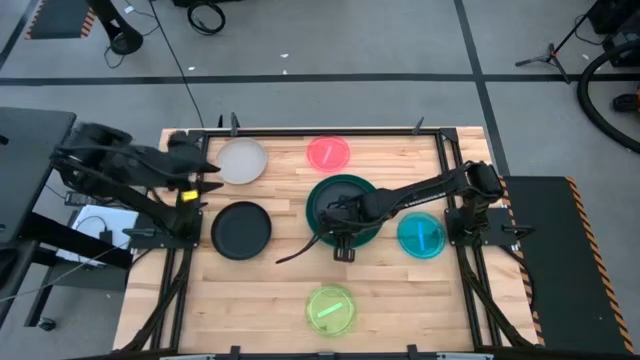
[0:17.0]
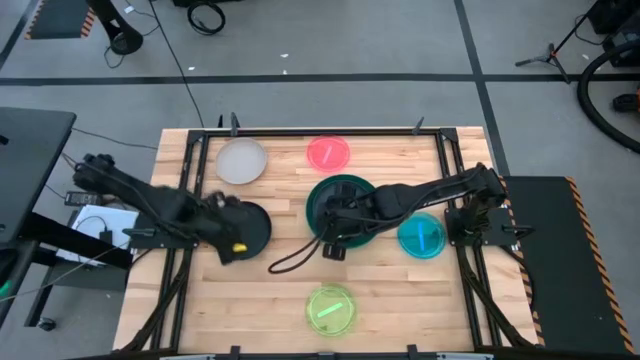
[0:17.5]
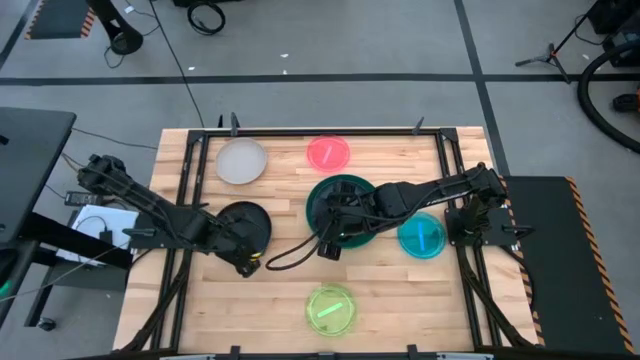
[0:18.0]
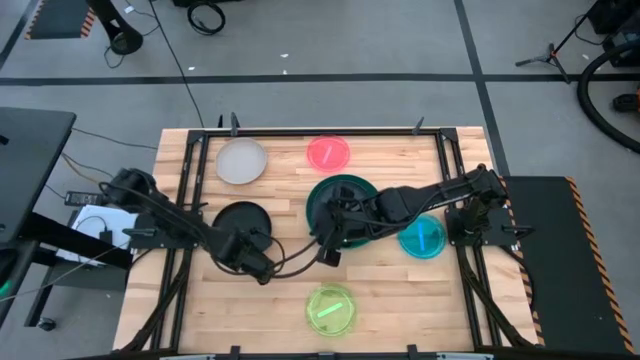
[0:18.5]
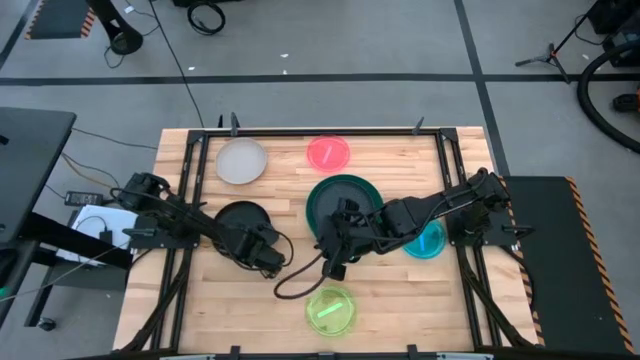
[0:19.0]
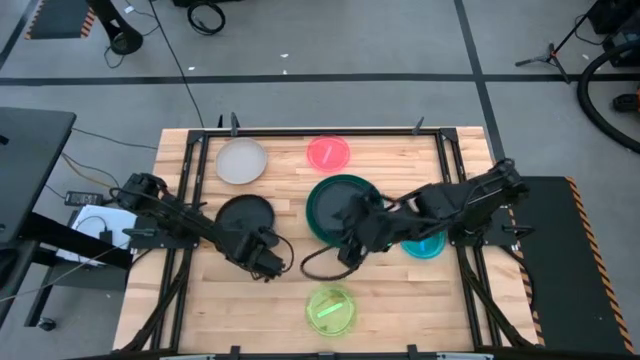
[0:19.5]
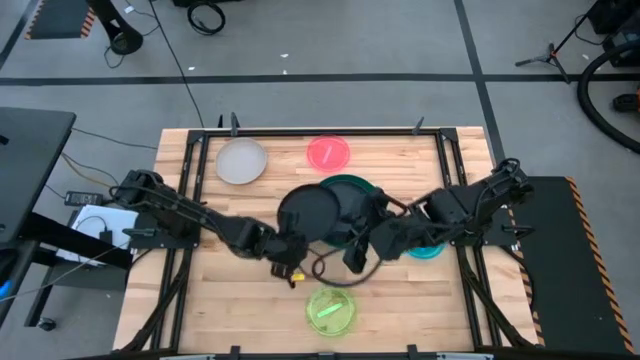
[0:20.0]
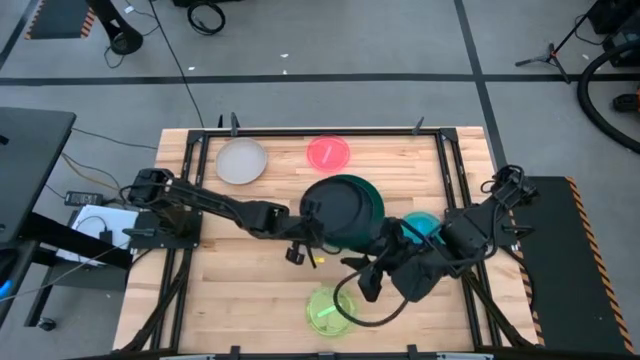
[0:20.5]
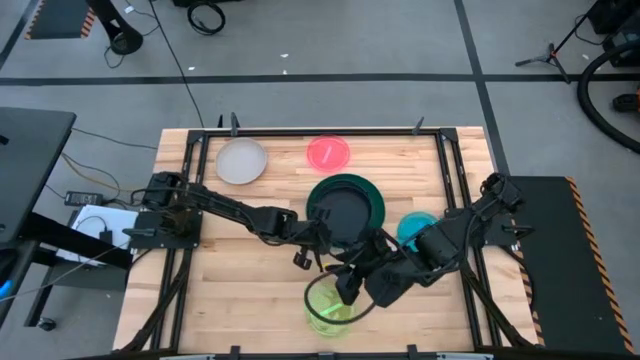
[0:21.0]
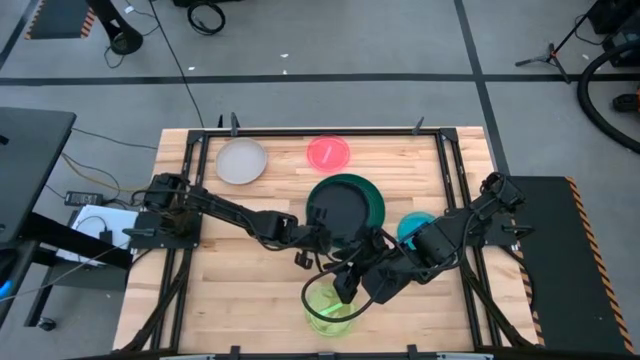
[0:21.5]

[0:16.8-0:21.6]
Task: Stack plastic plates
Stack the black plate on top of the black plate

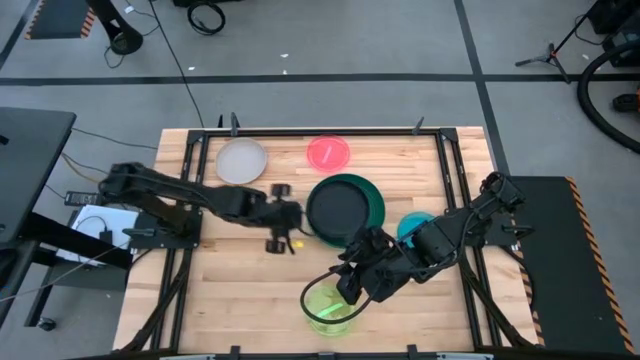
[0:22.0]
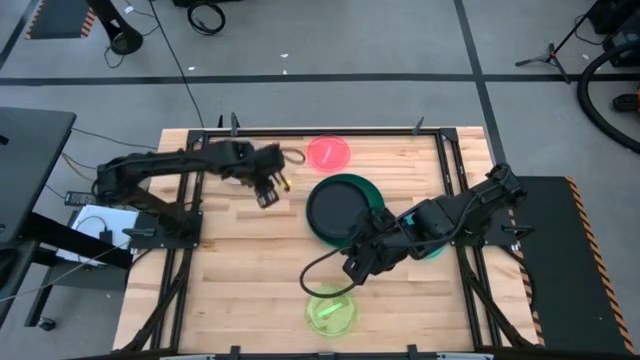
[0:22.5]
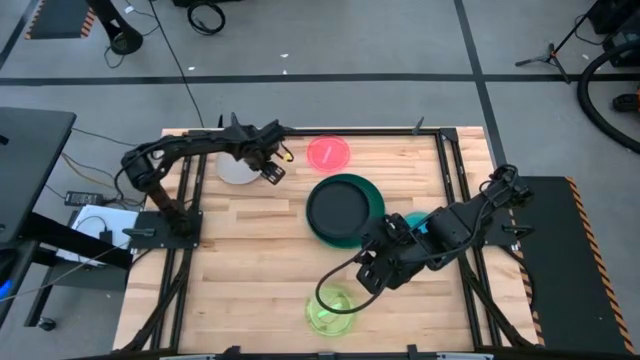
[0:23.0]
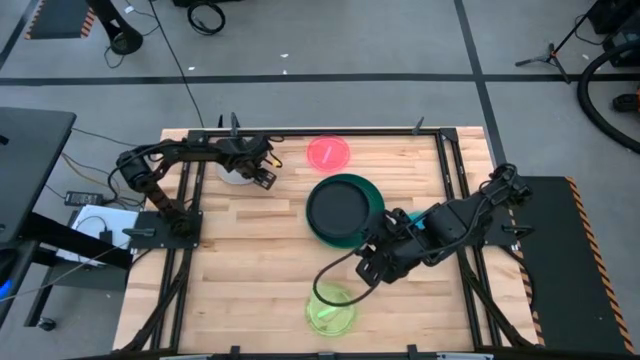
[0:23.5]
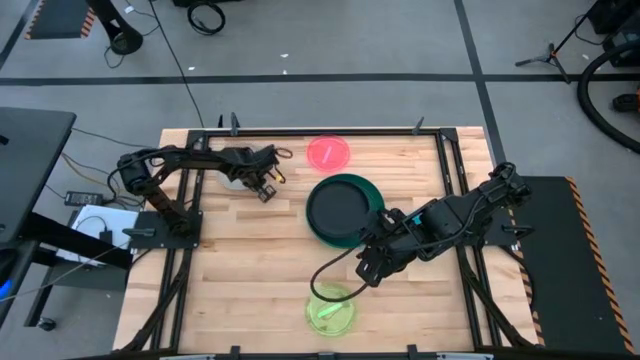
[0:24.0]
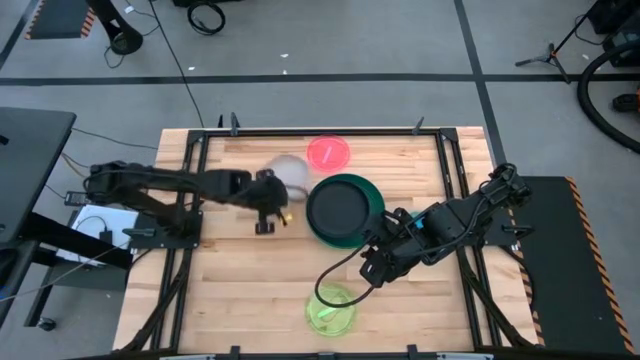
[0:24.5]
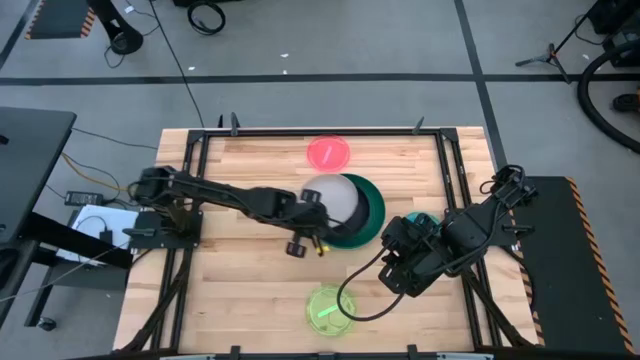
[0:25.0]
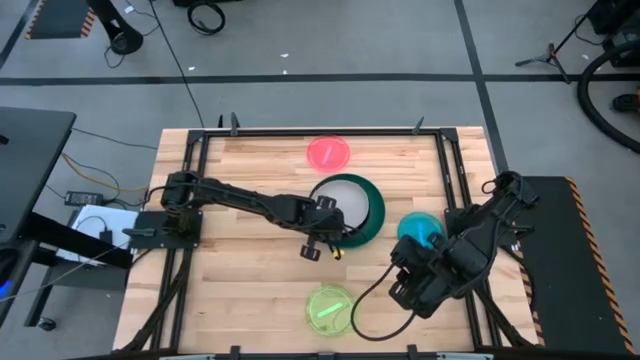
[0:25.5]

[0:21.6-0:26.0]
Stack the gray plate on top of the black plate

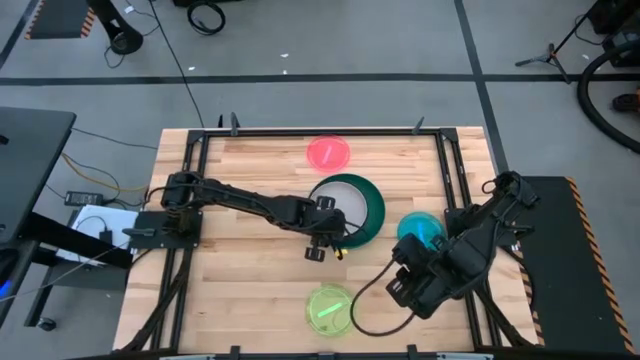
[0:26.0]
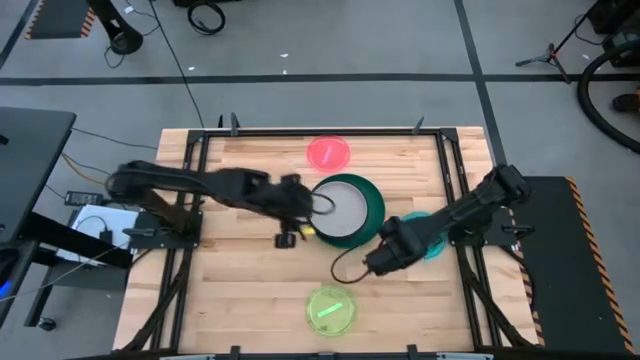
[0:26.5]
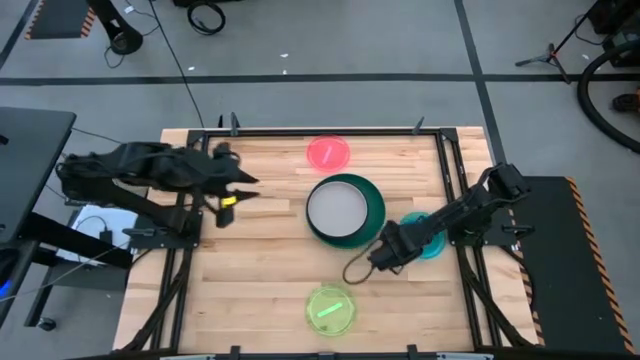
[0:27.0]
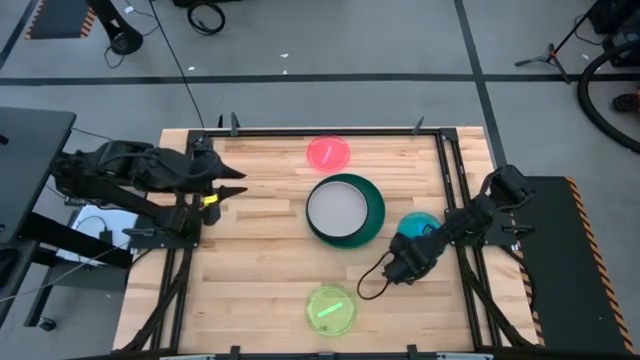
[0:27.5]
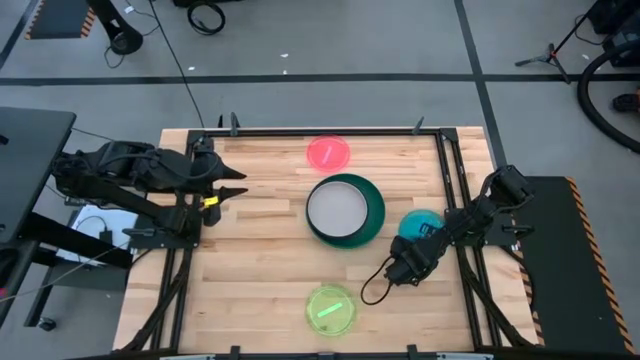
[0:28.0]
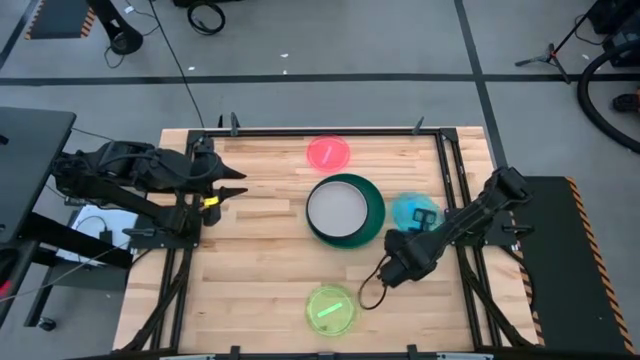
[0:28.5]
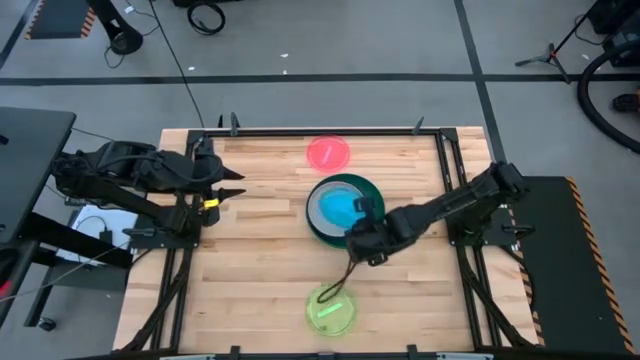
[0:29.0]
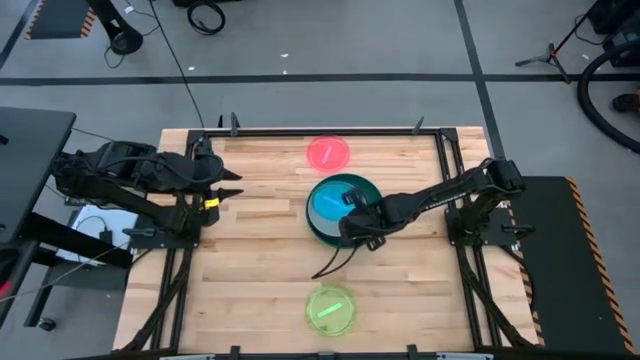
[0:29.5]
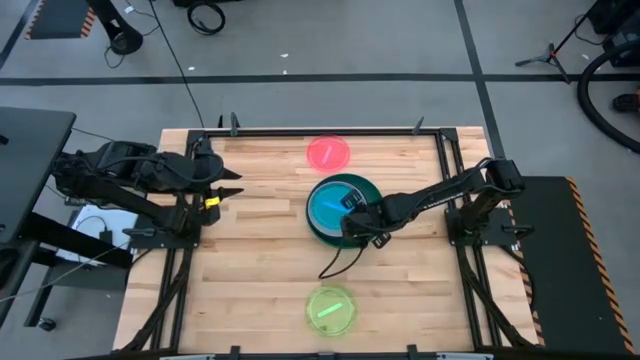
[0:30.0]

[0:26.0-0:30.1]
Stack the blue transparent plate on top of the gray plate

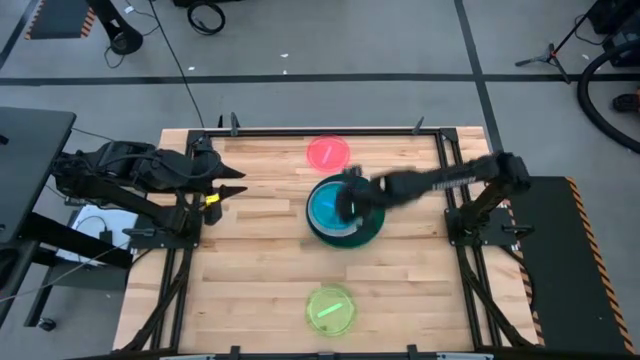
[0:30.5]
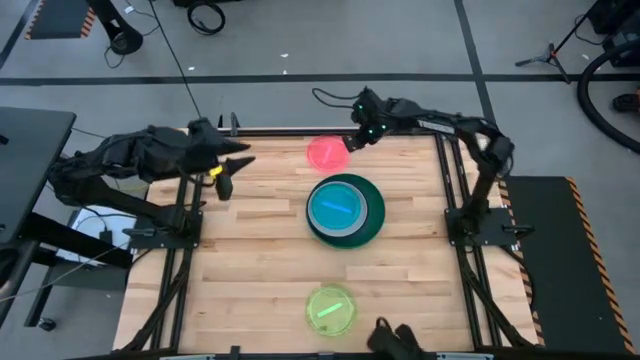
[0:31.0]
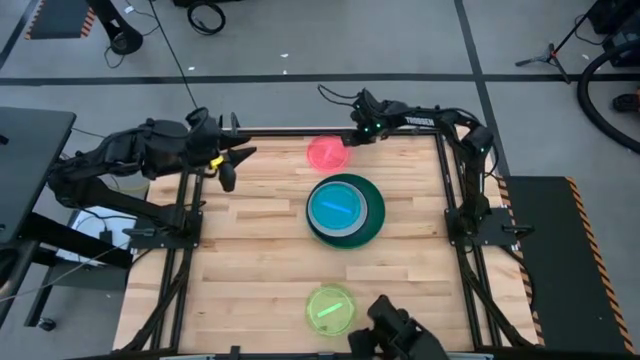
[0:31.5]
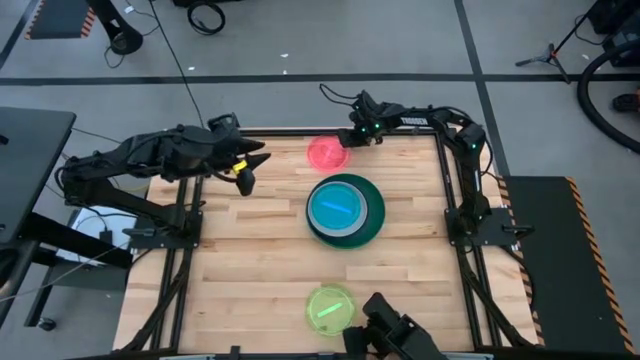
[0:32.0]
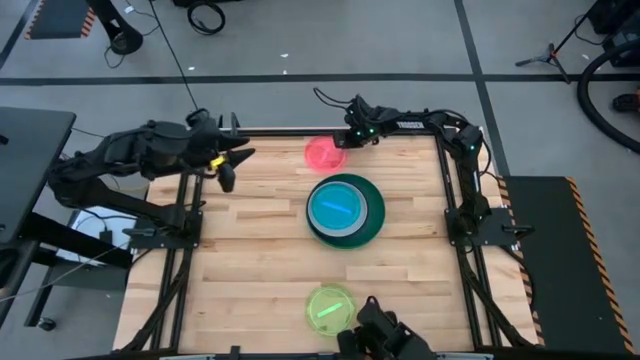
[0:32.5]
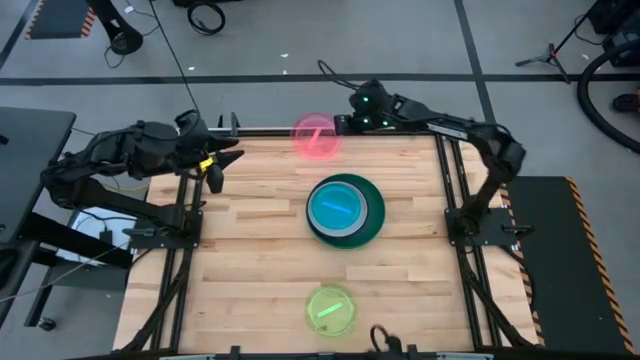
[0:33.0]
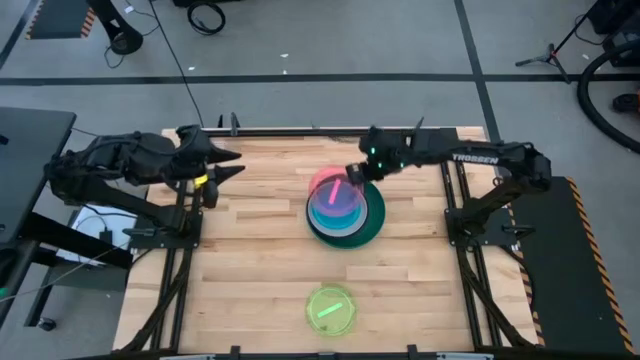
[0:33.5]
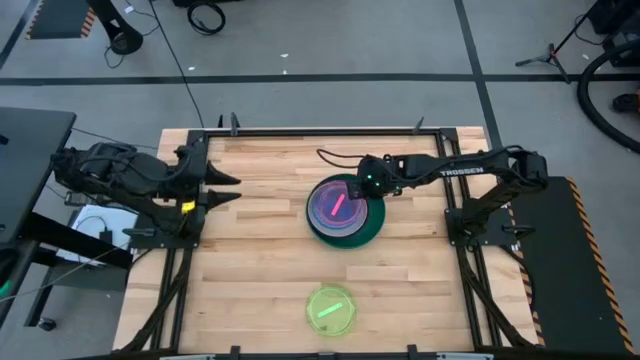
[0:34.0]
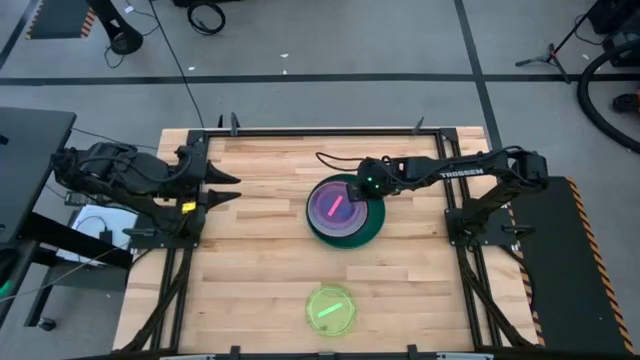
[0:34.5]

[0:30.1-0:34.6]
Stack the pink transparent plate on top of the blue transparent plate

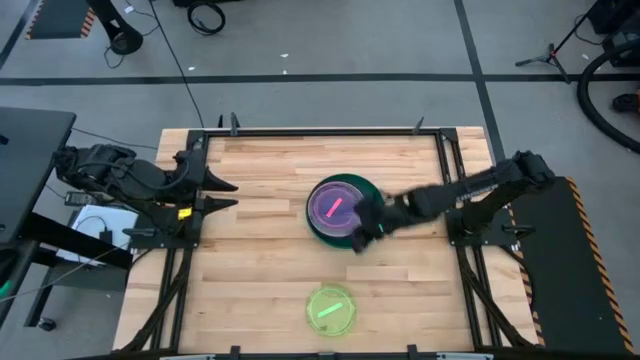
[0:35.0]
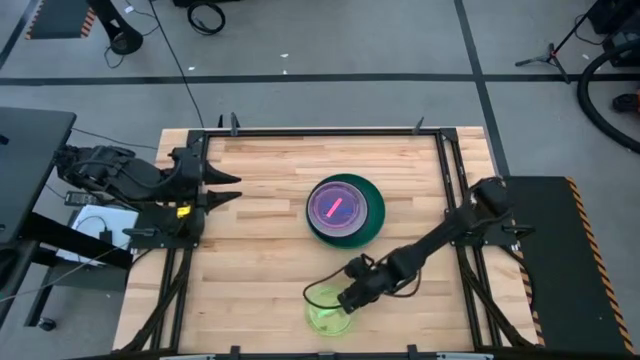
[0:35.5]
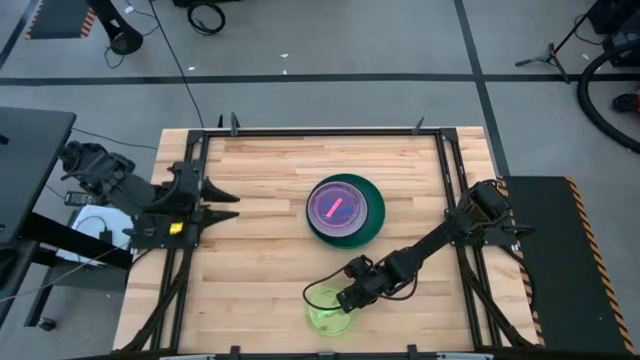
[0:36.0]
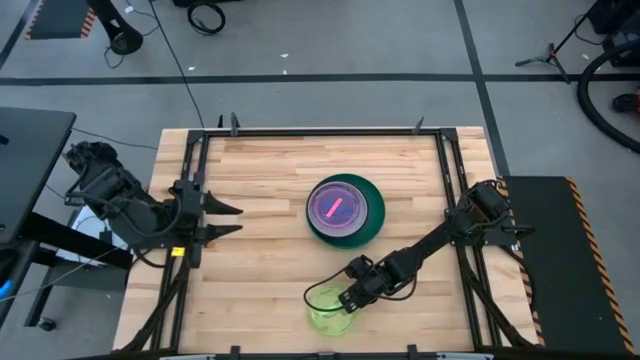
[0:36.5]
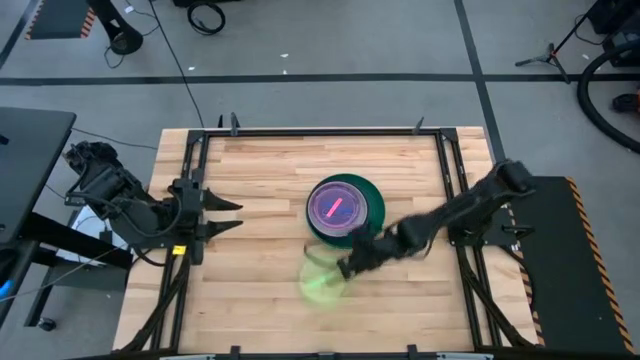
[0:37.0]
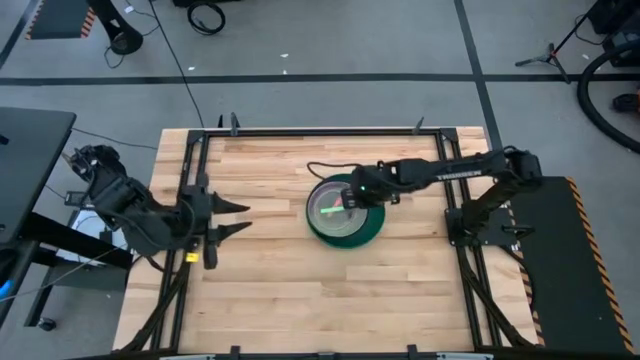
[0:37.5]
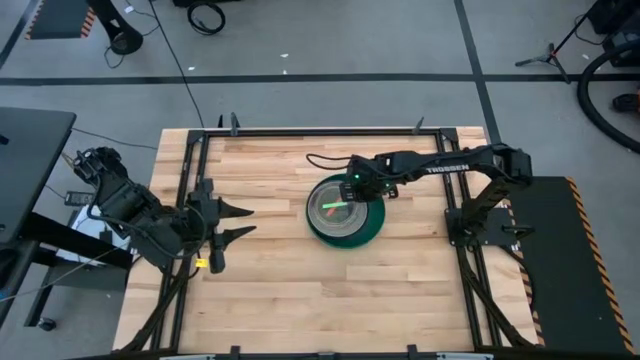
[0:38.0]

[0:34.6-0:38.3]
Stack the green transparent plate on top of the pink transparent plate
